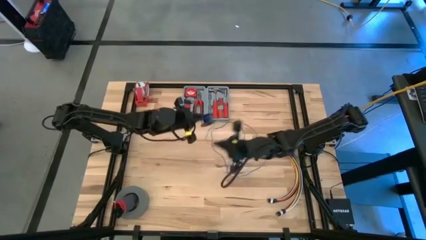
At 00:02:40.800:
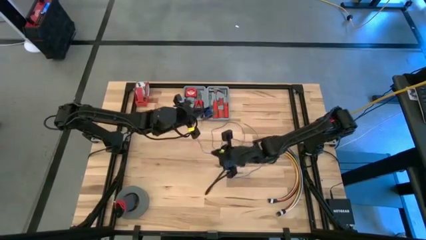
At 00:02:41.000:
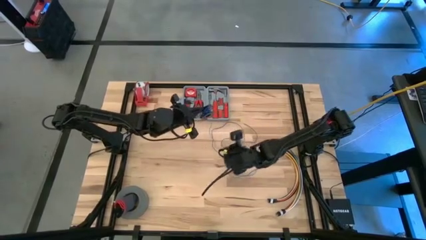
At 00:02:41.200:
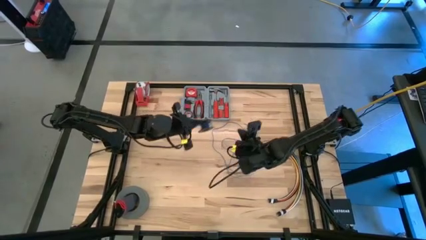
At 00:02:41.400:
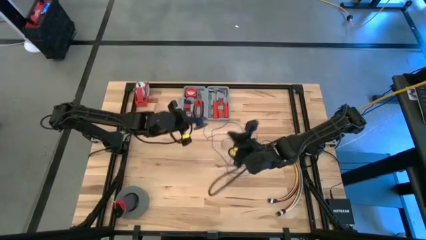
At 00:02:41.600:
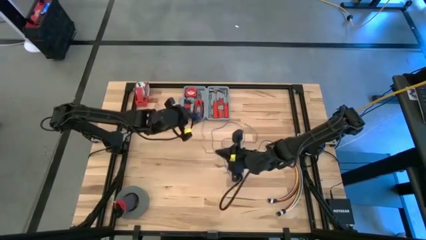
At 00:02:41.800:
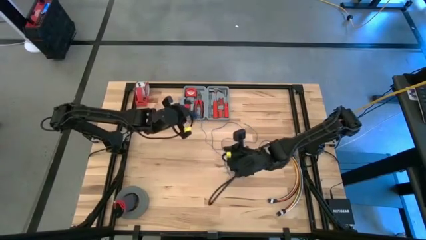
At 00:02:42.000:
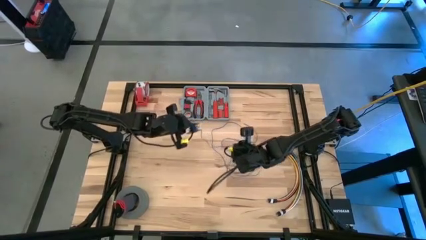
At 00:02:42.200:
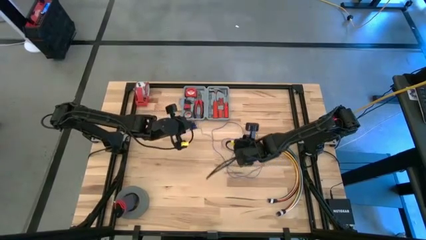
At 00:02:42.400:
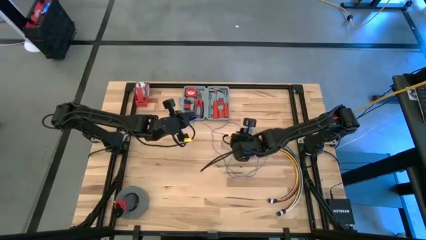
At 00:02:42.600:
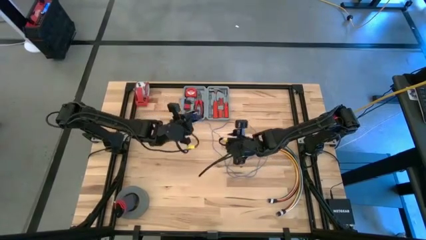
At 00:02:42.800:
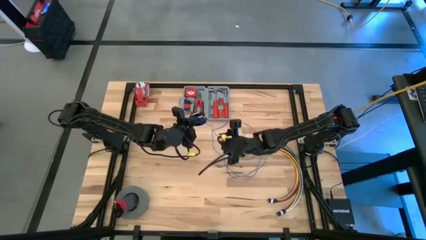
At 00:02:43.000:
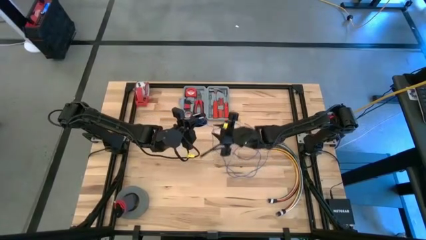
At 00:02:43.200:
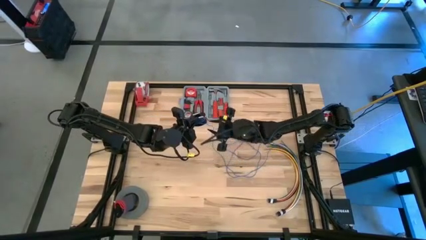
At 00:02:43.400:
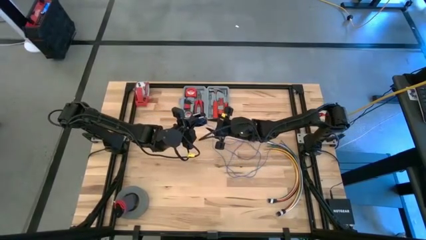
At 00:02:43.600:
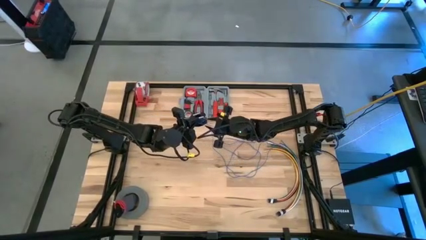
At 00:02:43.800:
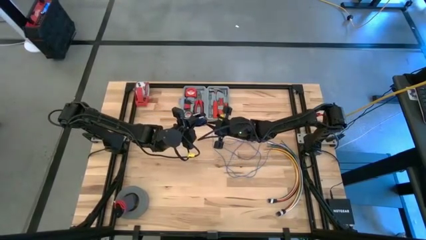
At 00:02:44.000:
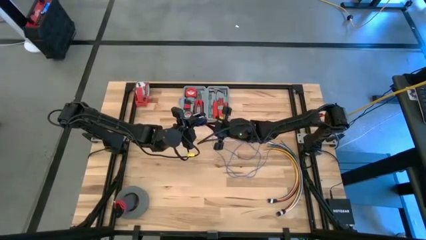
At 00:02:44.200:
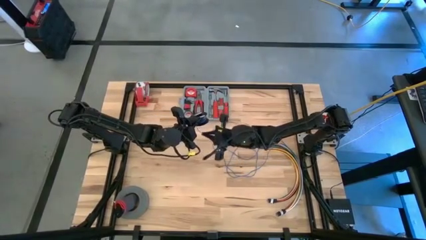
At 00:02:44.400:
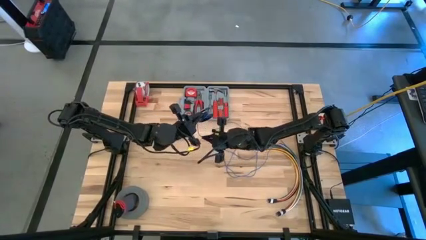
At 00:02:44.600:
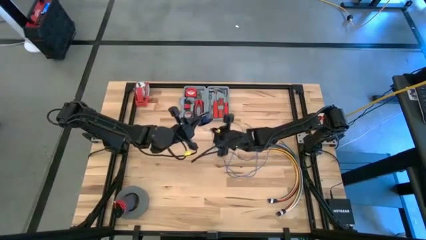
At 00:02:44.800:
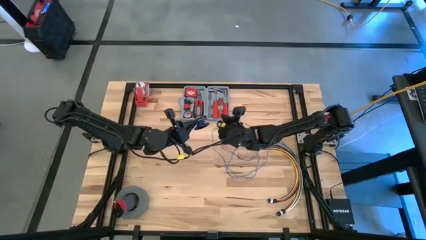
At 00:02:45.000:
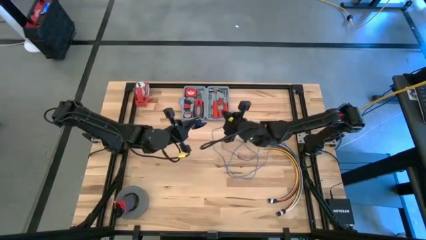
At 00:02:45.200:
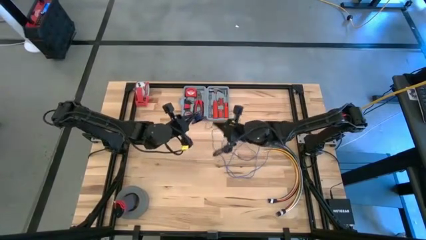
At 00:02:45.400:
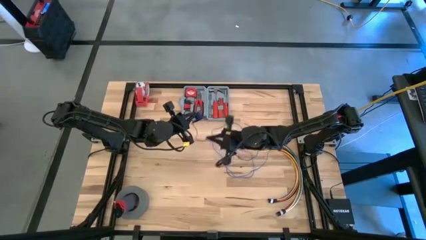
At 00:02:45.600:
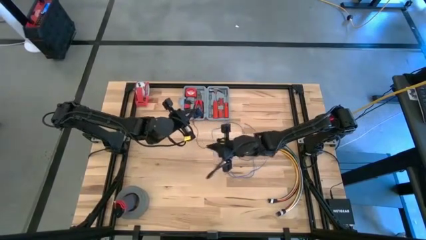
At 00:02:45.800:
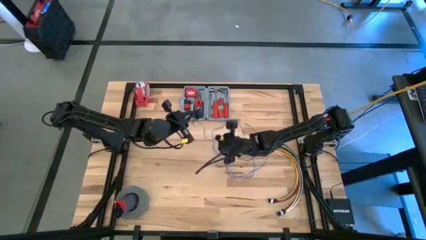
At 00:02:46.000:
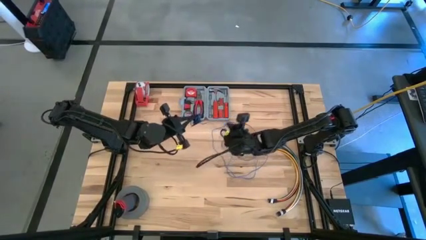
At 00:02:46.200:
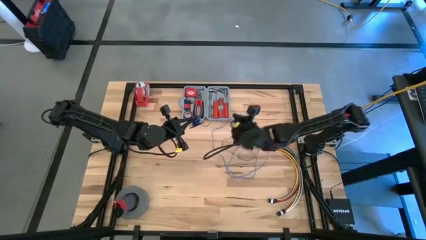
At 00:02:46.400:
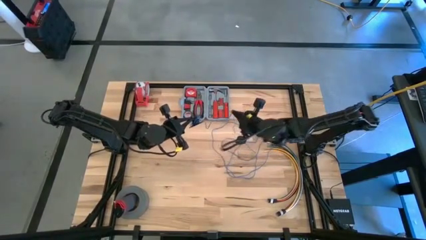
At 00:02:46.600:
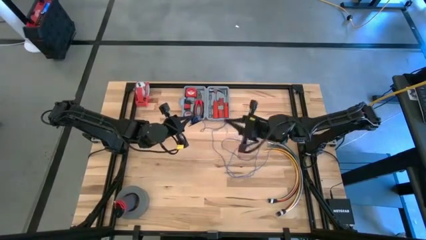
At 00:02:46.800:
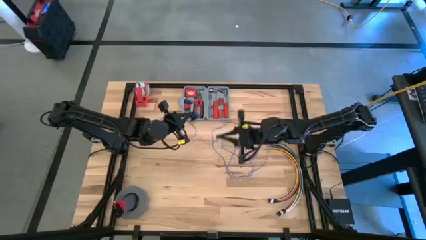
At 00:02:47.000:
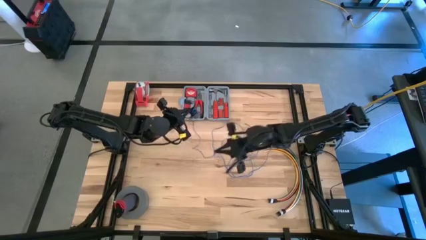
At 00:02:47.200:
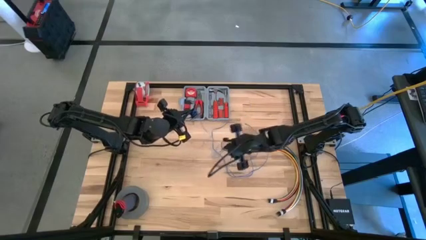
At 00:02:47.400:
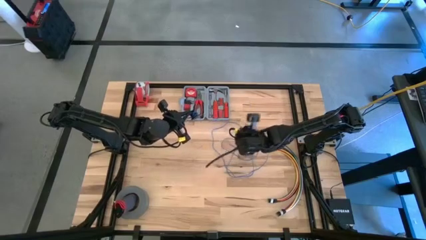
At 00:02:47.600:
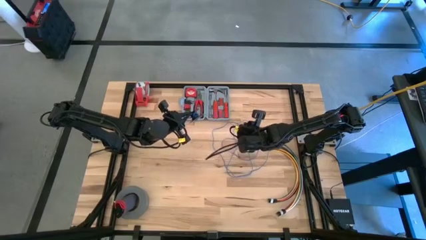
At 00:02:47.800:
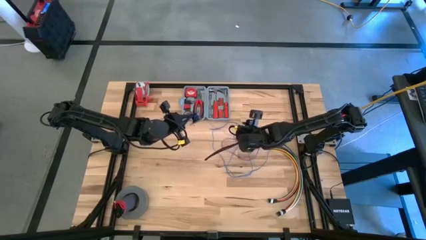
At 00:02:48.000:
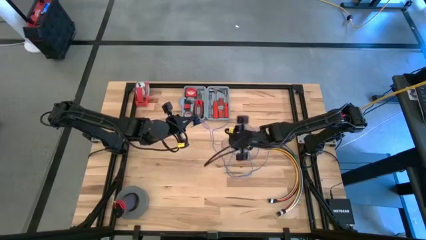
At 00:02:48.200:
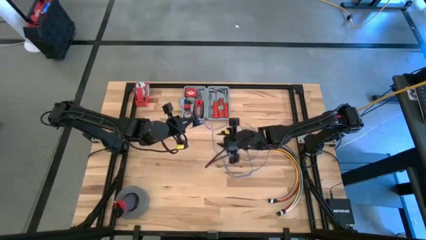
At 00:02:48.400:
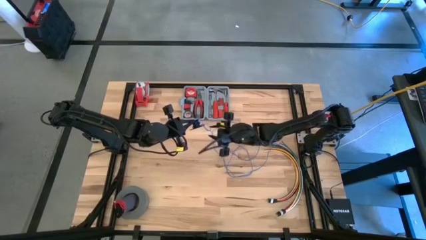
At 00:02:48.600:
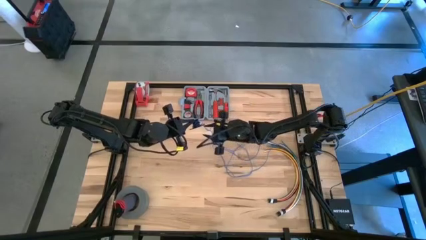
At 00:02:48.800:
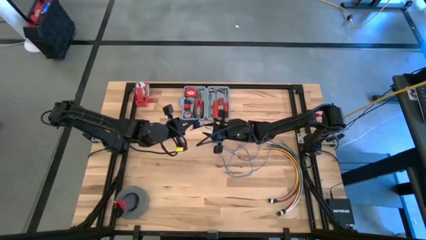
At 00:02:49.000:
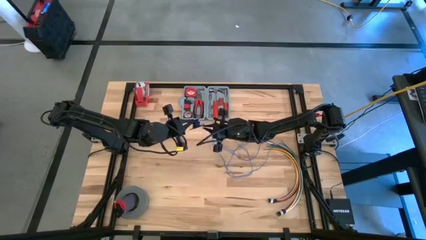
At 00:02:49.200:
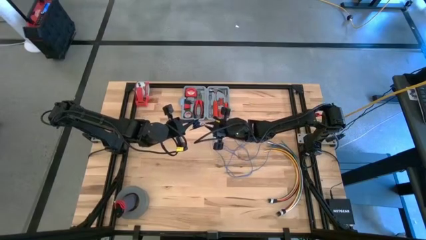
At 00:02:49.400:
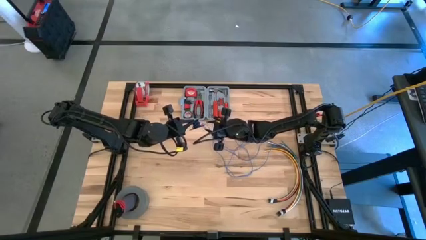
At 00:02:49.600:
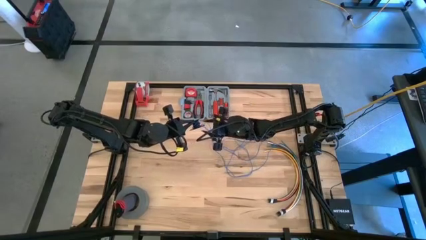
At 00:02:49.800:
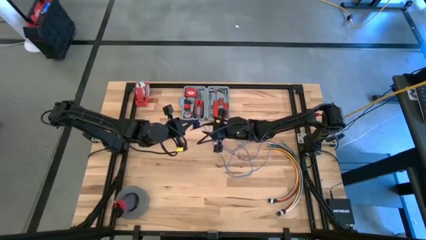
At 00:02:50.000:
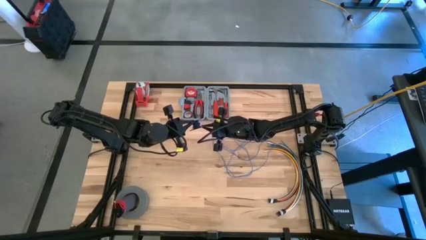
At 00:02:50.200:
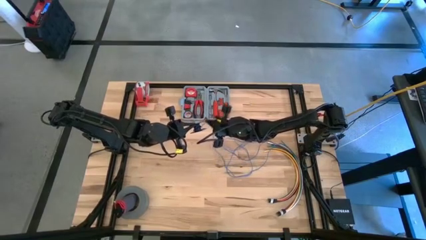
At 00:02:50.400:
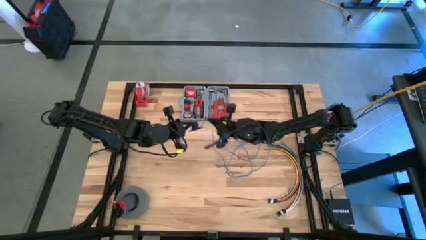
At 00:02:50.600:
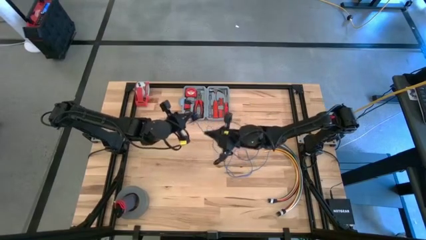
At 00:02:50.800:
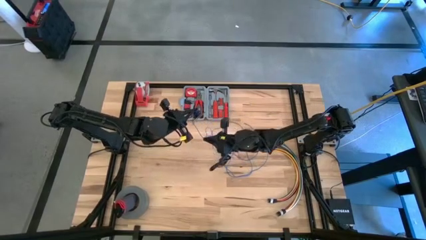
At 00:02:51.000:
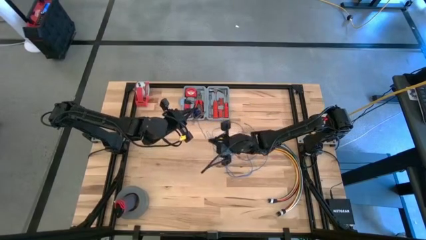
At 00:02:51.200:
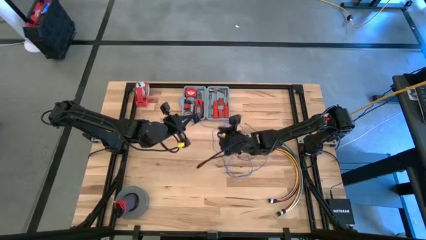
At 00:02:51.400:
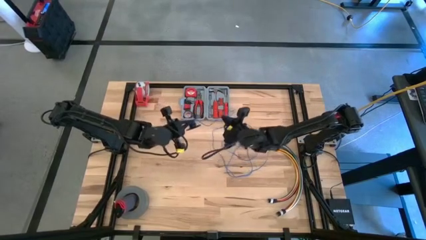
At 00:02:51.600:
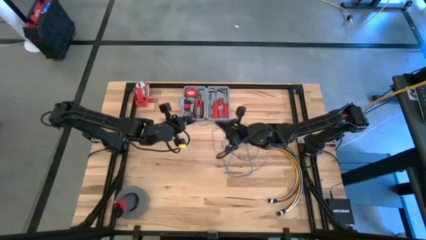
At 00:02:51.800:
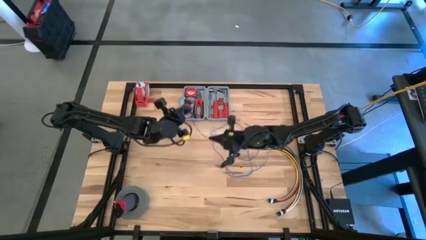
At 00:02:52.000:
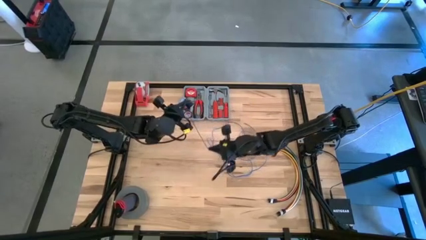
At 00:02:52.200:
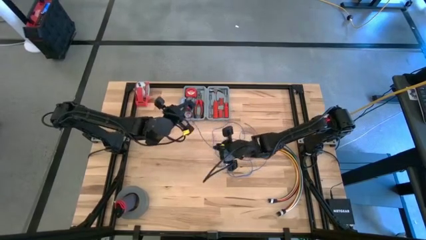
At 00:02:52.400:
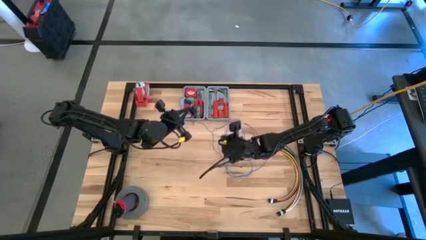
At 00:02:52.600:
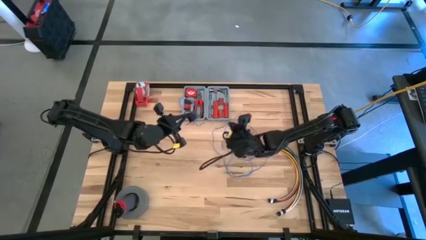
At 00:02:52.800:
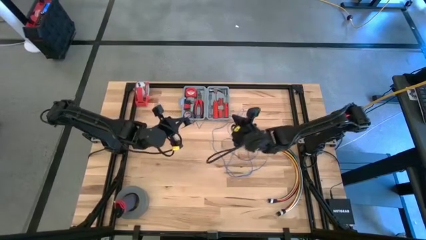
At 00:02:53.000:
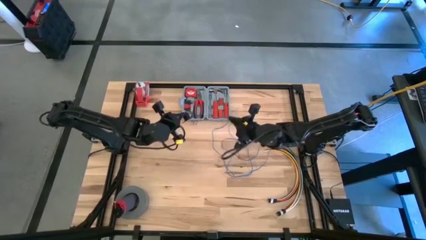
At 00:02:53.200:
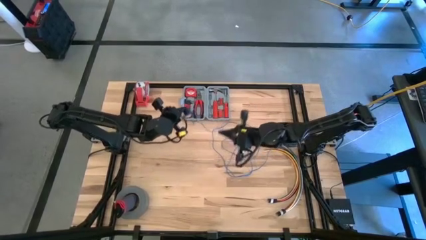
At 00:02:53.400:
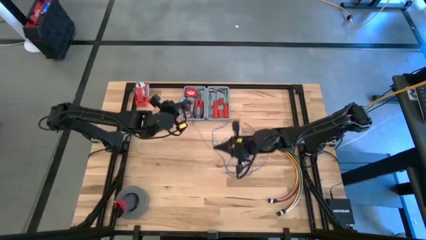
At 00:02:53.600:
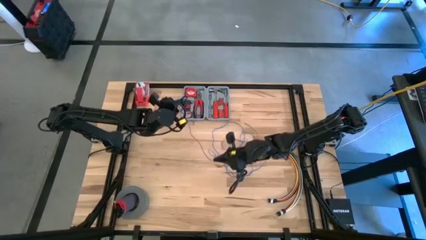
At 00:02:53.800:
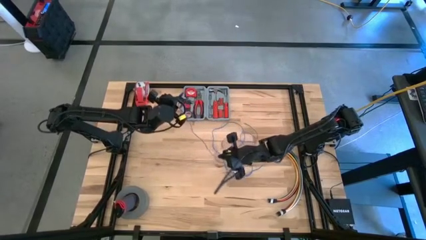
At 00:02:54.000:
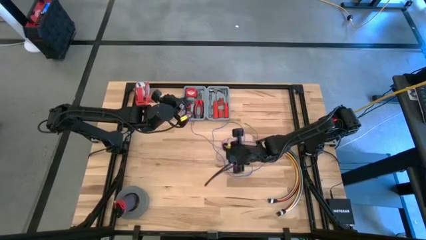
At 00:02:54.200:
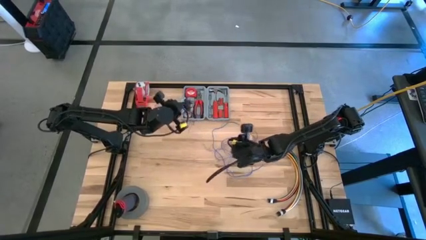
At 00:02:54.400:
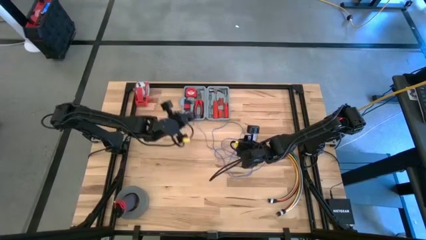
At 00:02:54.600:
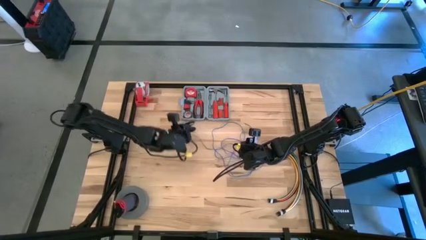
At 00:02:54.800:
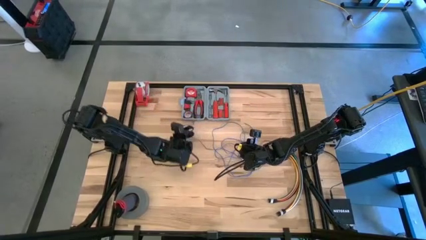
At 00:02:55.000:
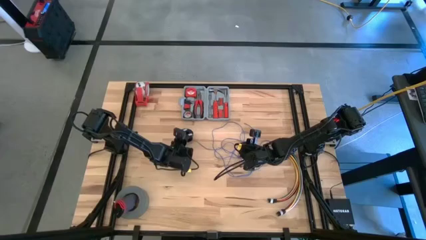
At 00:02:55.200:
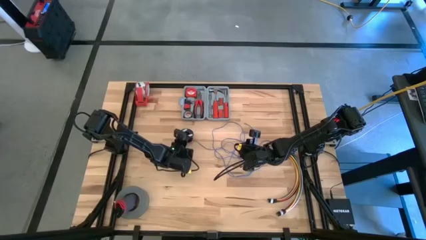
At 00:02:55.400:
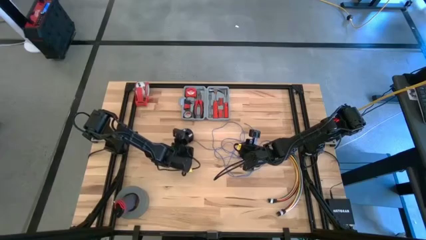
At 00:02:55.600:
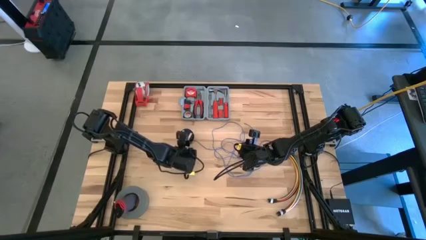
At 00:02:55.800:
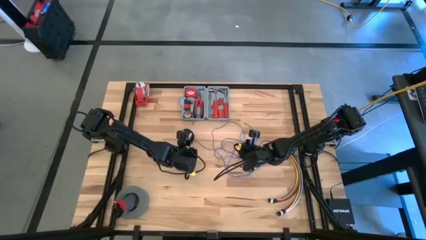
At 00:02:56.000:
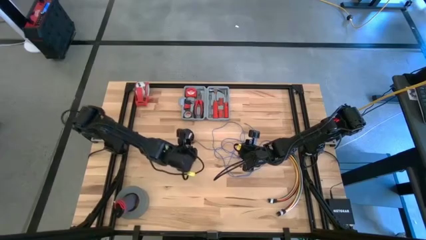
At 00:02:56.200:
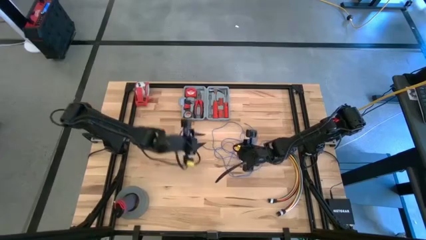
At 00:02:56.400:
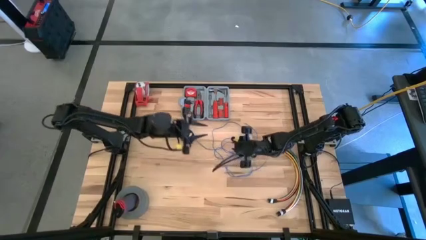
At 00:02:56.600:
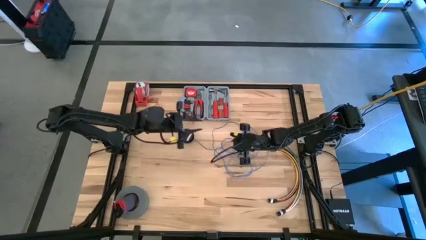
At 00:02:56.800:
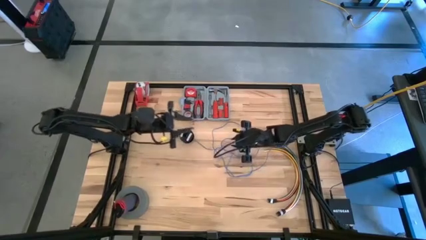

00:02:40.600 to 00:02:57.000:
Task: Coil cords
Uncoil the blue wire from the spool
